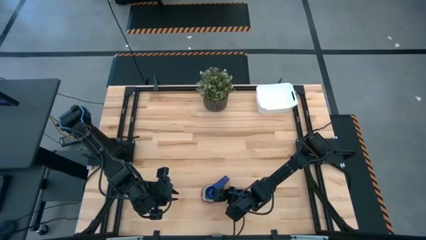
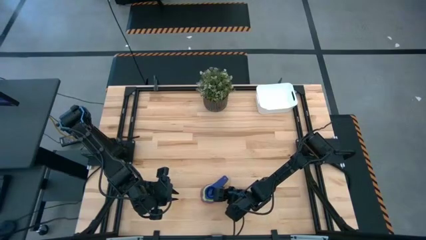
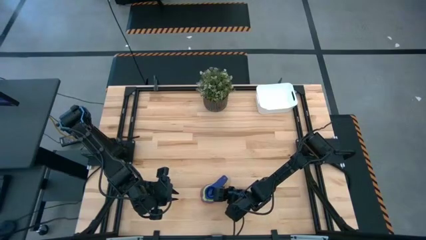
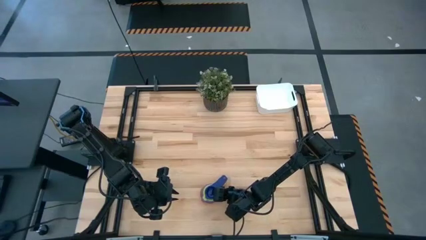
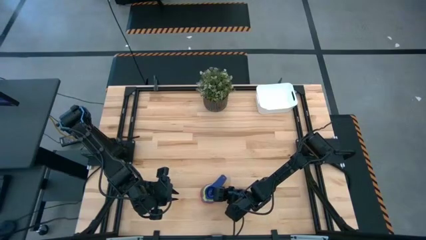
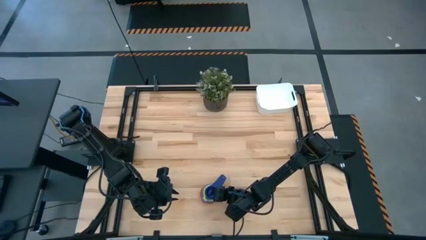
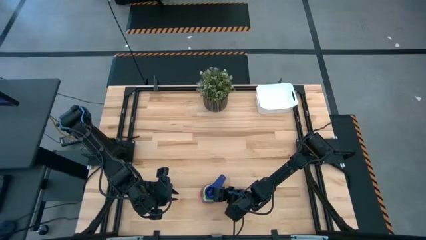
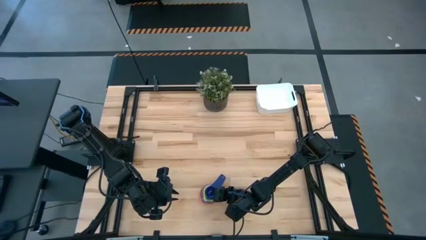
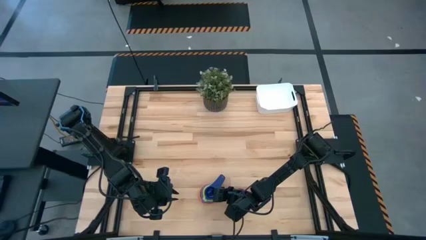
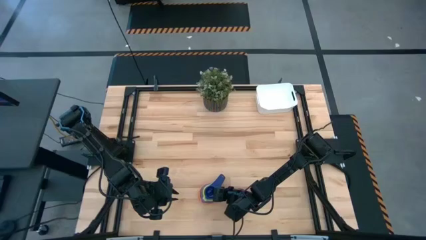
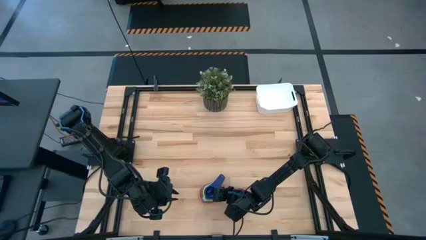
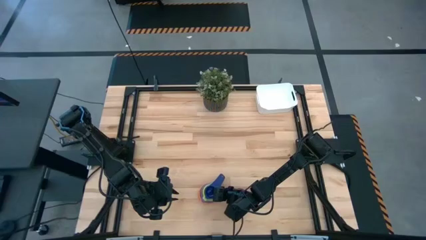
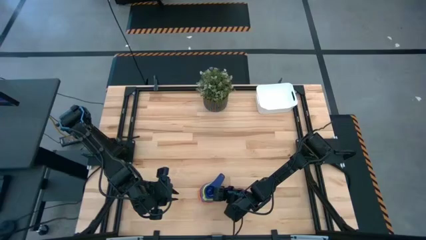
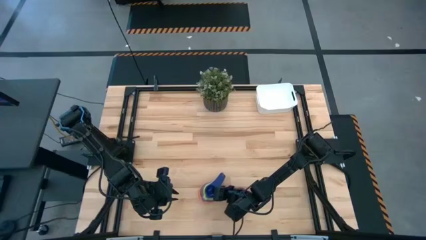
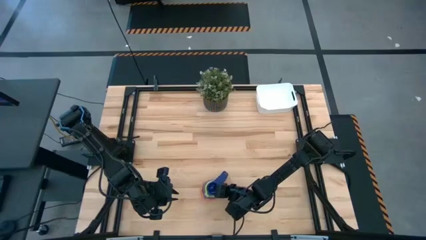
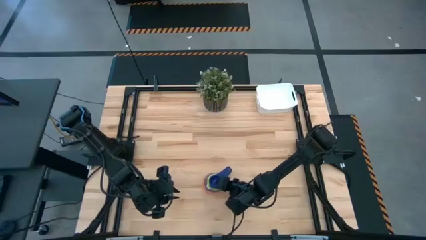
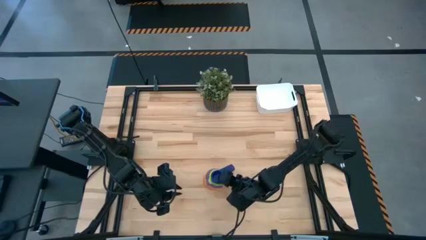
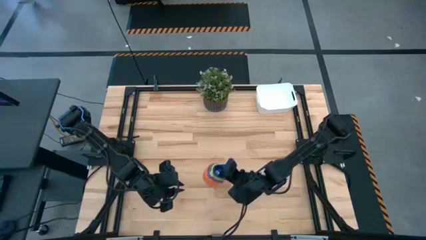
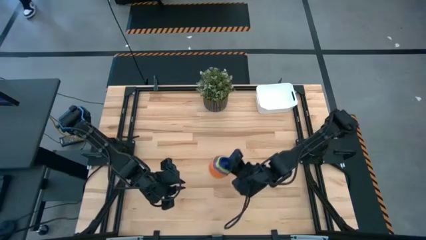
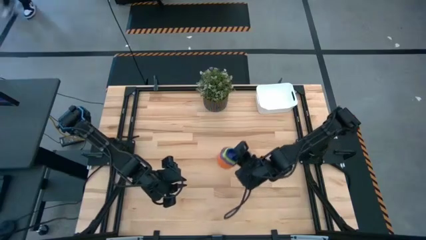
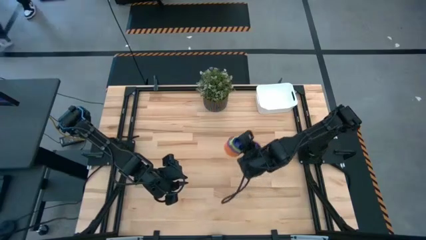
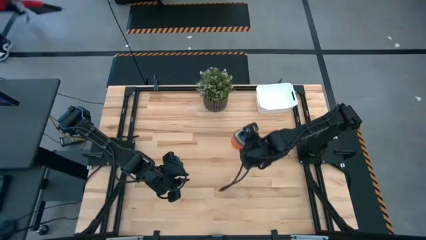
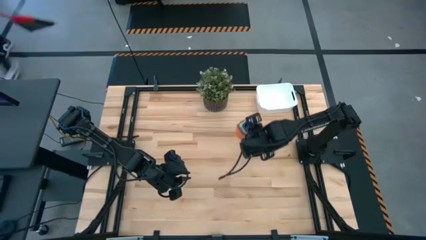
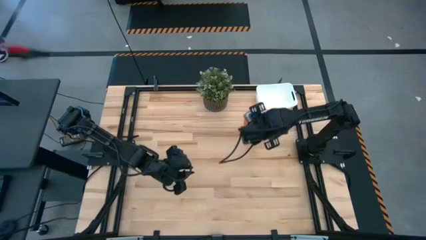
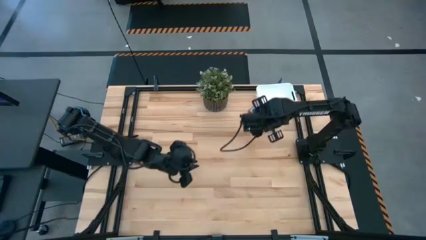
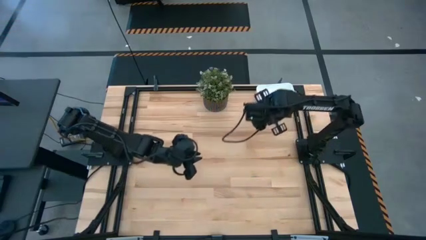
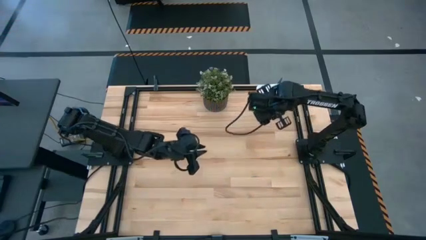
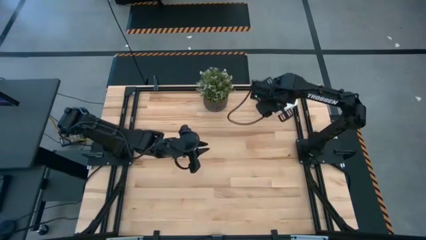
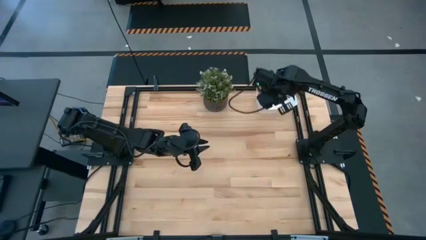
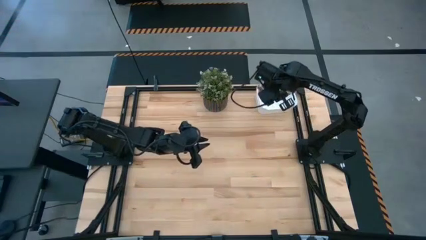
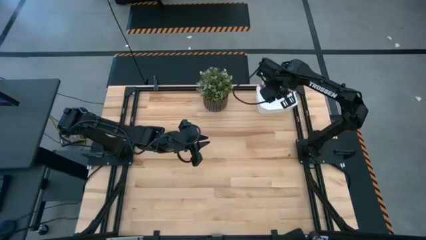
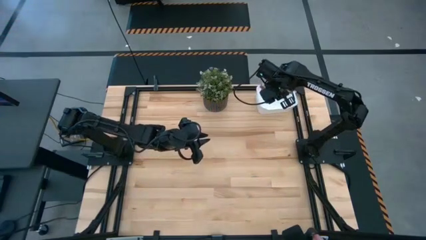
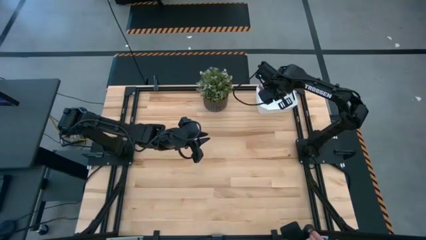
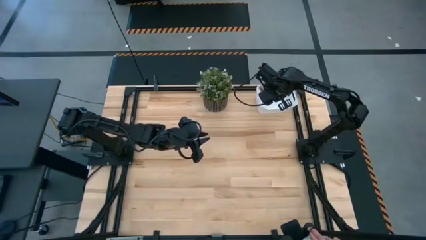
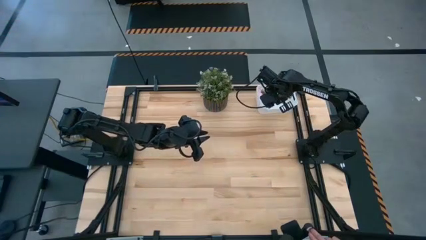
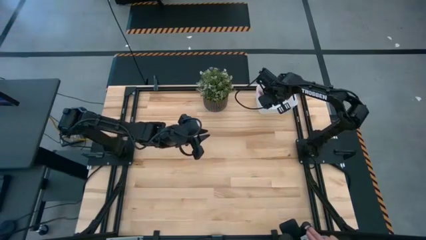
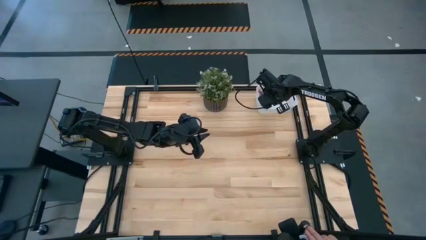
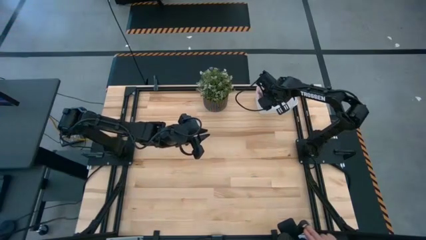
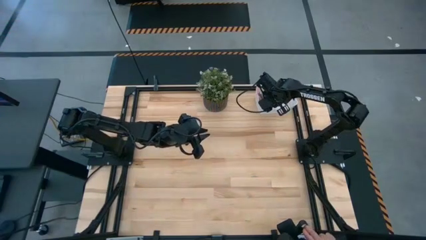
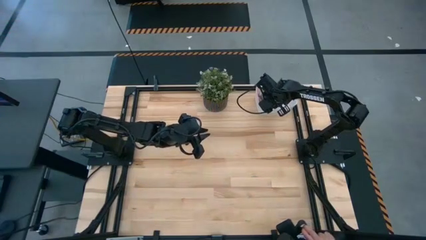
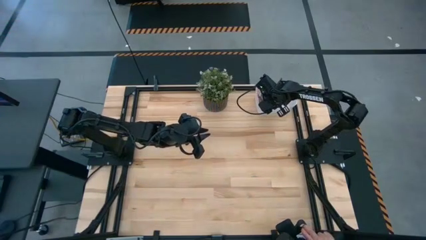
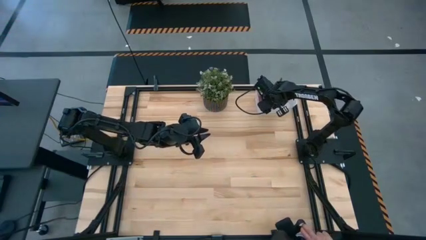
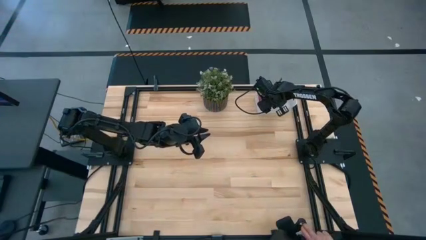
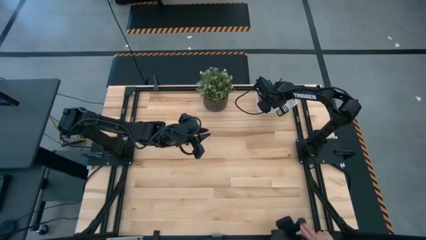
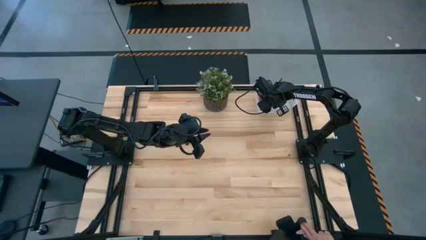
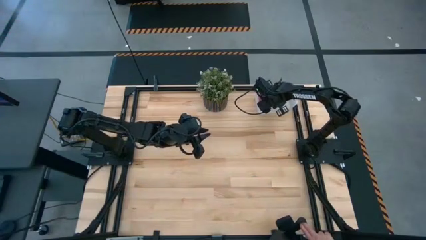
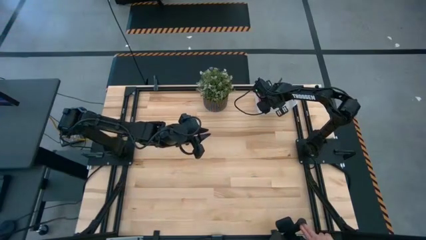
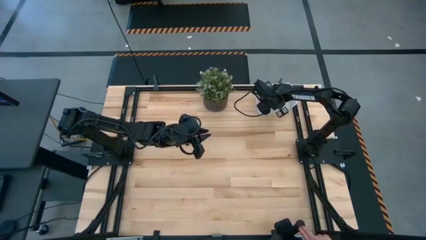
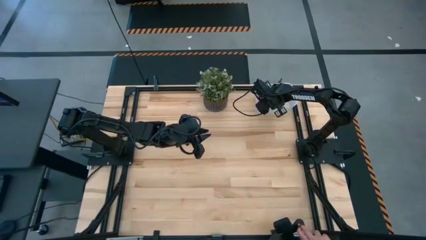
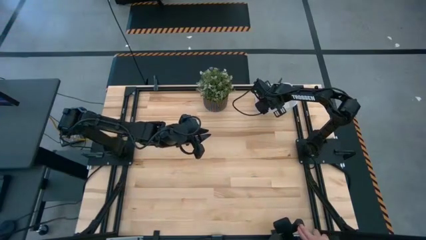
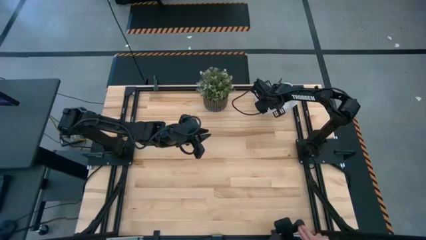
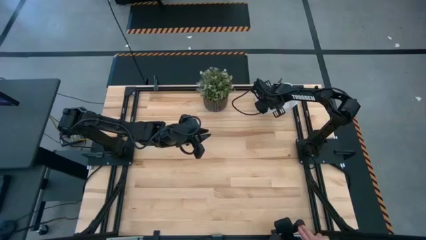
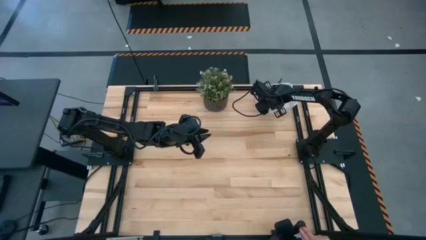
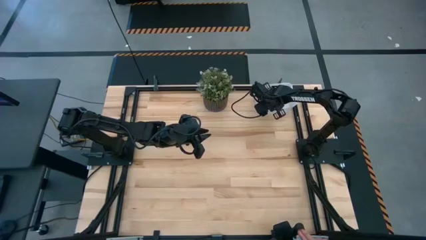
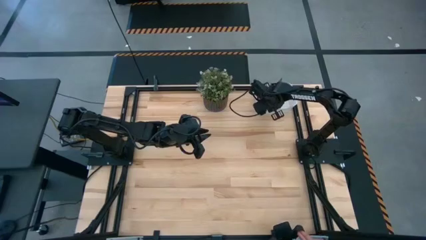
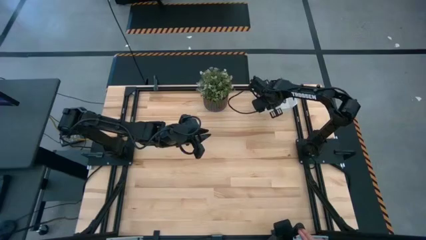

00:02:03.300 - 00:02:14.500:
Task: Nest measuring cups in basket
Put the stacked measuring cups into the white bin
